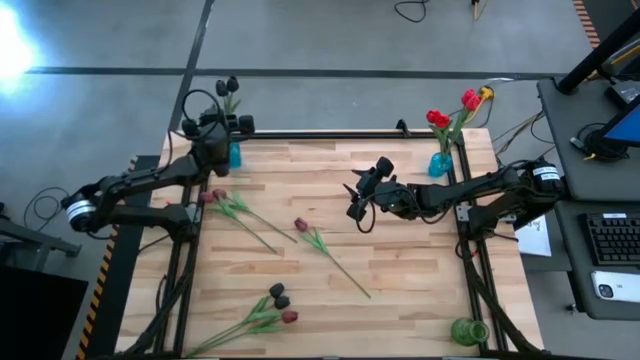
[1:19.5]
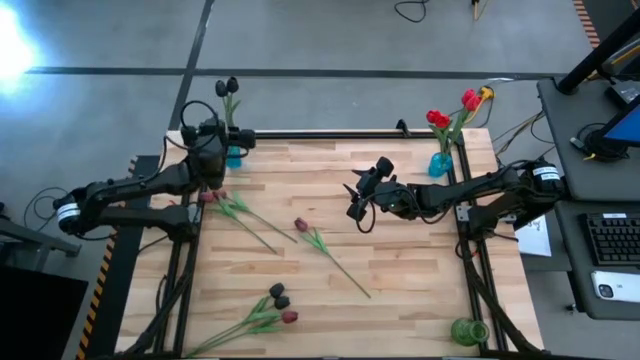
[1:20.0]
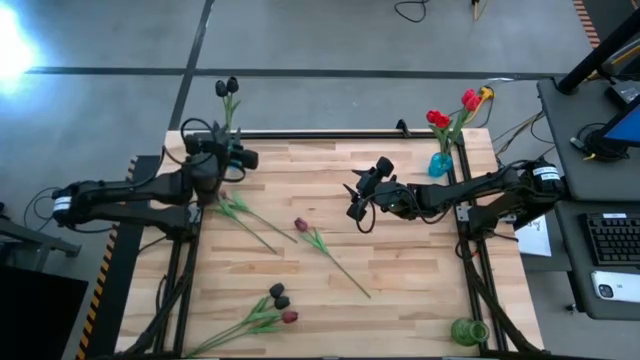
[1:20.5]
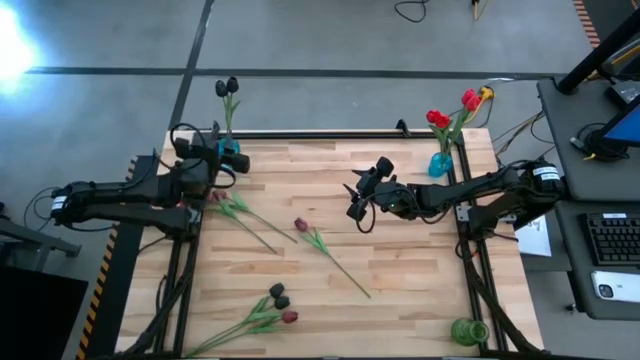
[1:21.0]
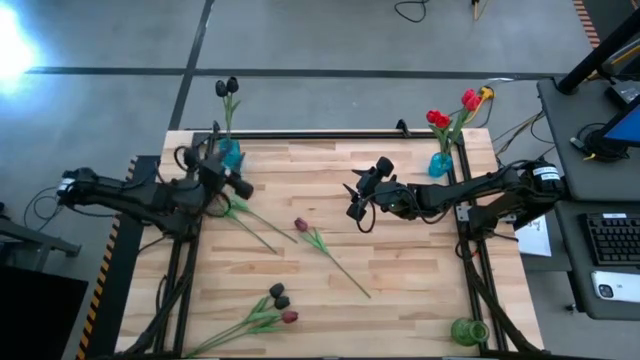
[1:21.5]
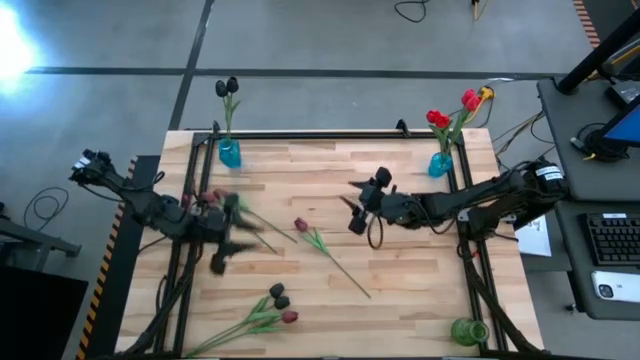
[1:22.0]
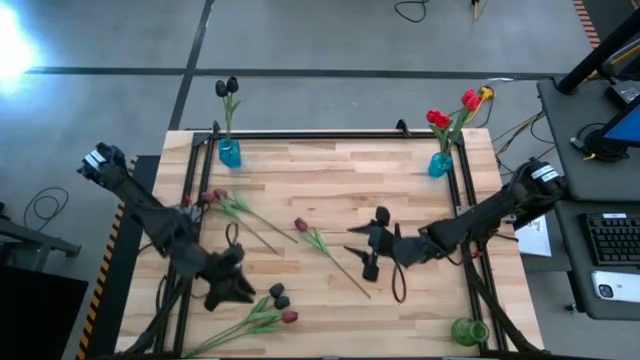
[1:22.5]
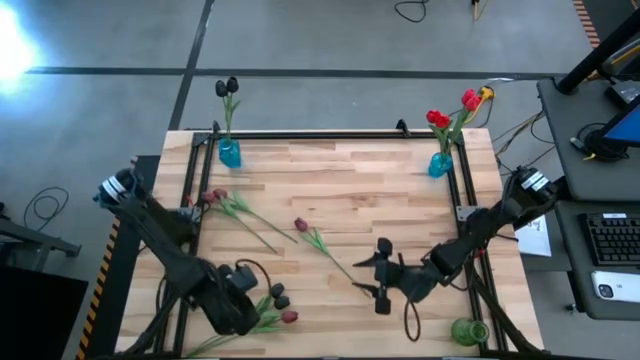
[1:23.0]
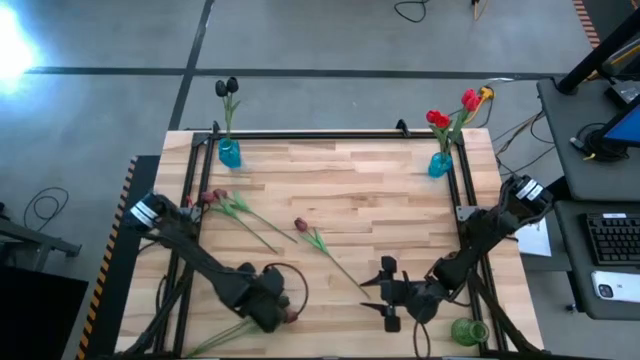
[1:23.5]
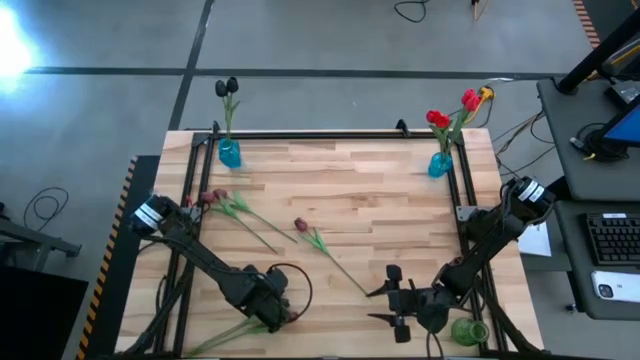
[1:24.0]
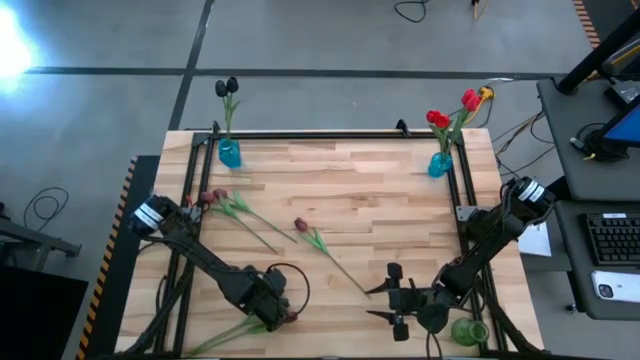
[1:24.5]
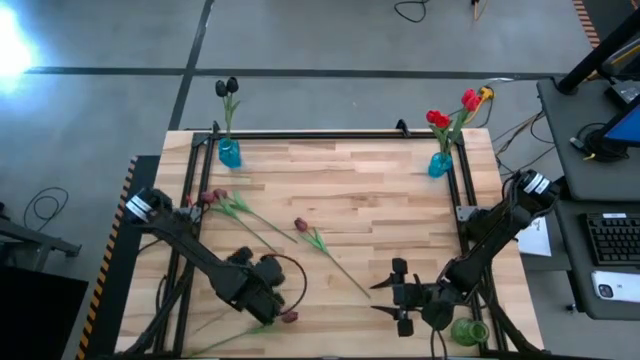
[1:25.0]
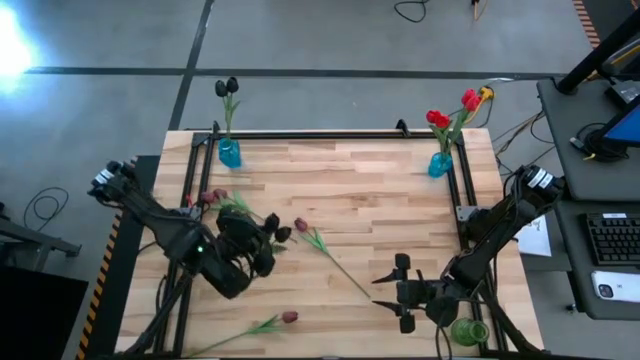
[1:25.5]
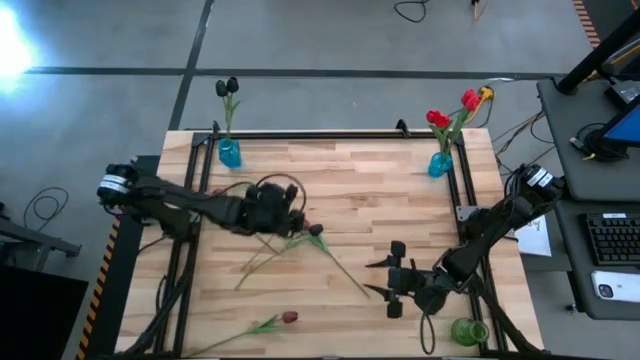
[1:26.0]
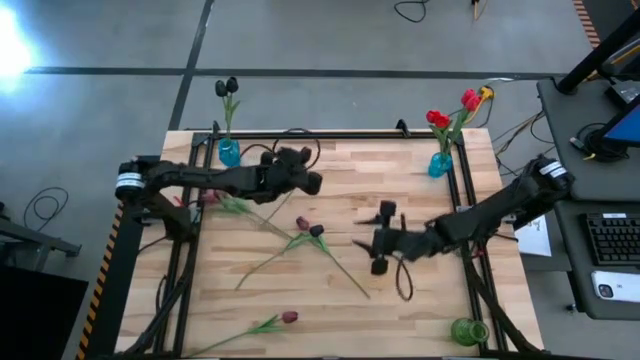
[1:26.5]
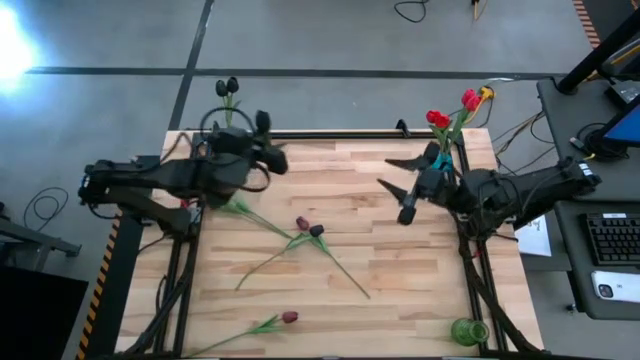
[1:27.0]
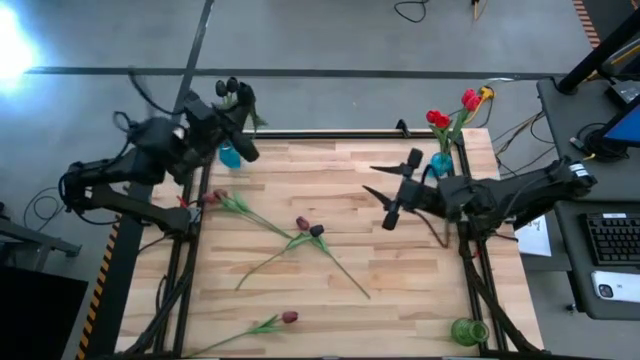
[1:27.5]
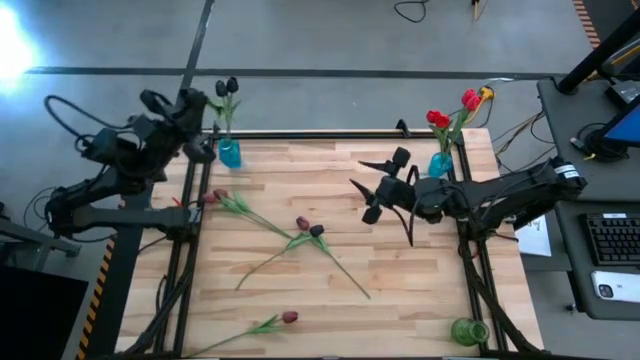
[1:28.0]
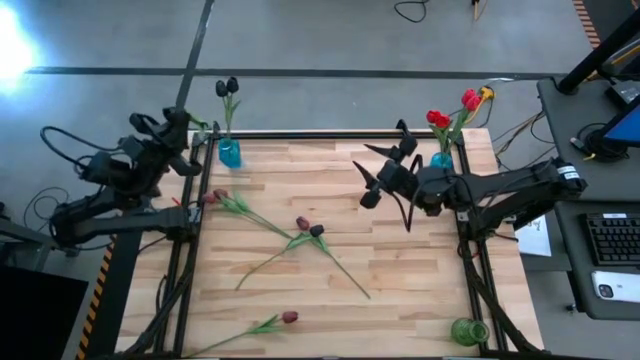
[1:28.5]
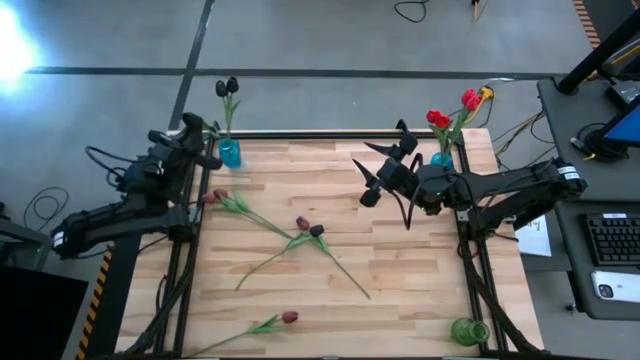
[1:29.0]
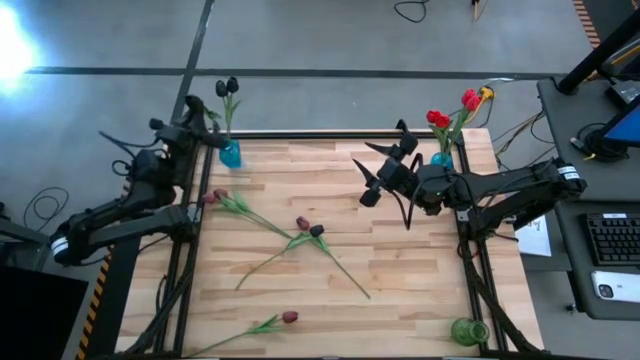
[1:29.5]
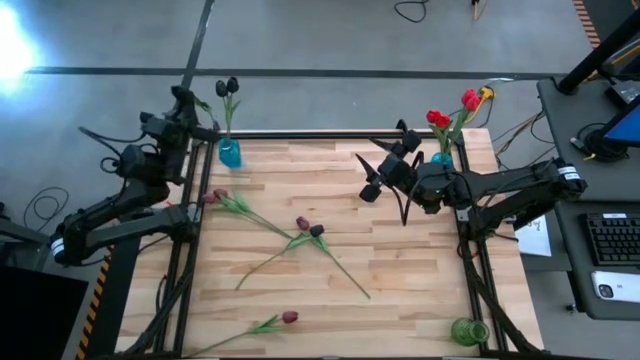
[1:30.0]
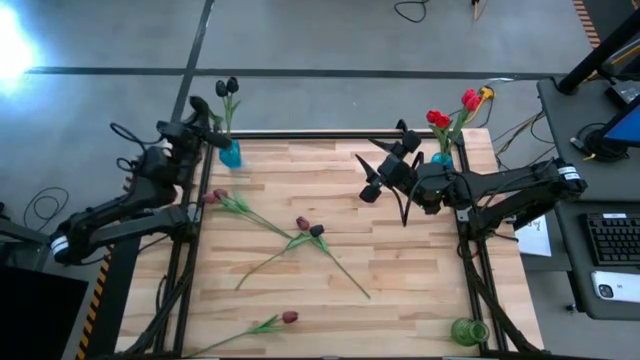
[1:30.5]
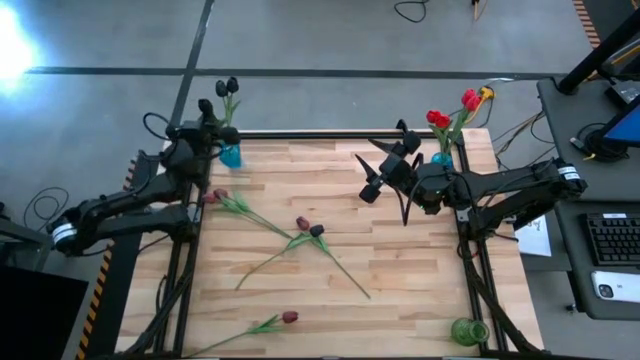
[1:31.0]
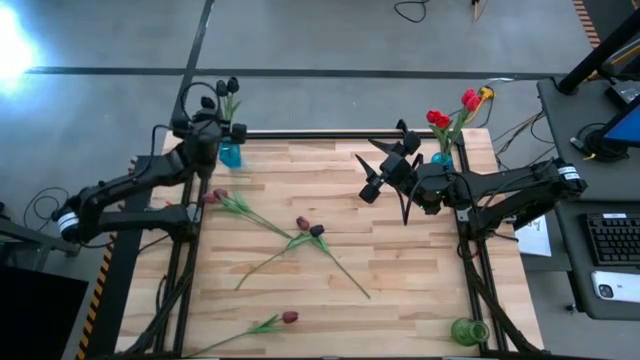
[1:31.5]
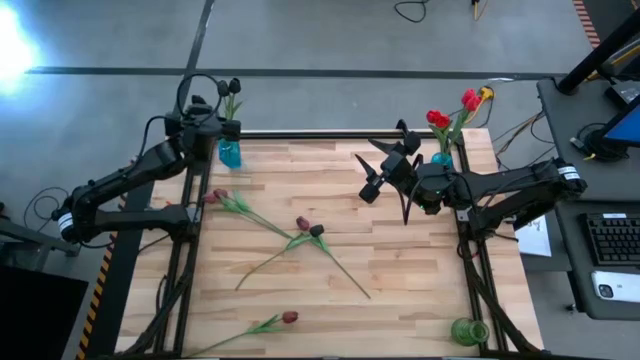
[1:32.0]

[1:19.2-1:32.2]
Task: Sort flowers into vase by color
Put the black tulip into the left blue vase

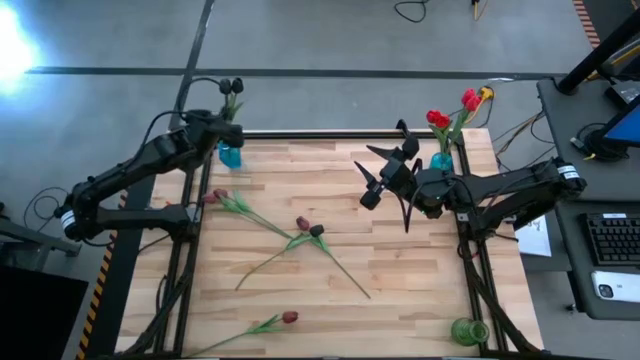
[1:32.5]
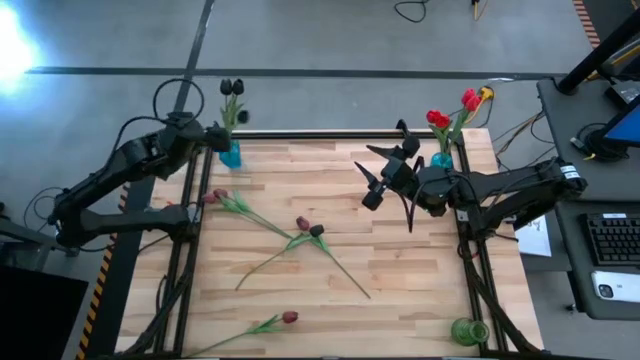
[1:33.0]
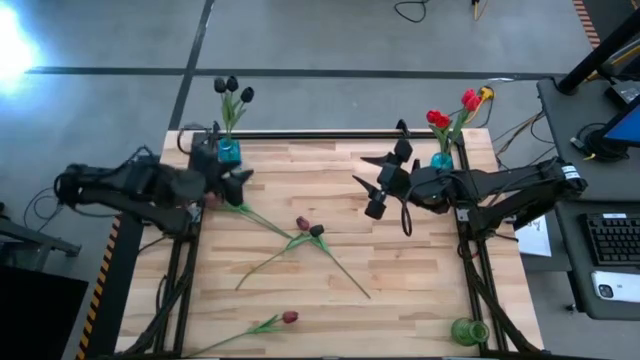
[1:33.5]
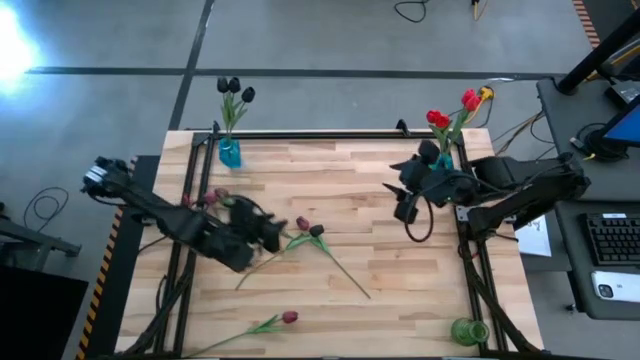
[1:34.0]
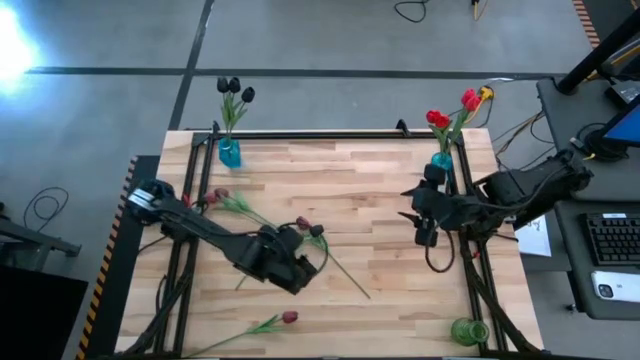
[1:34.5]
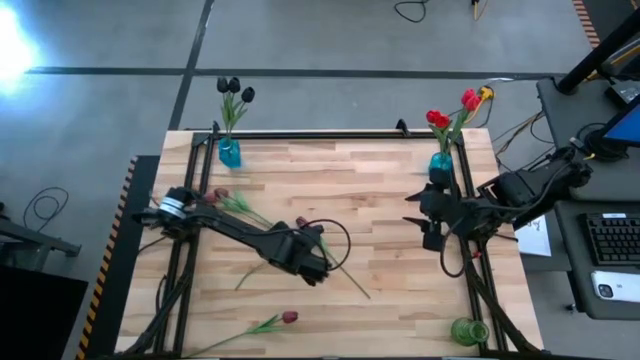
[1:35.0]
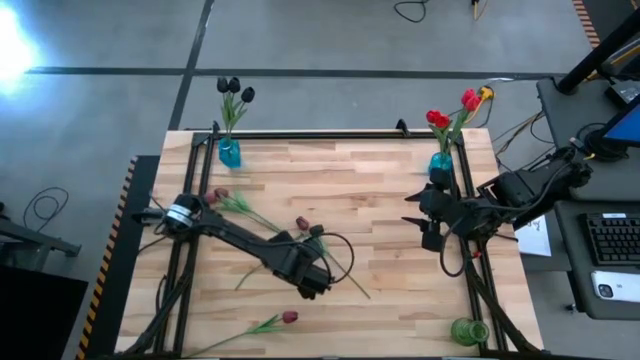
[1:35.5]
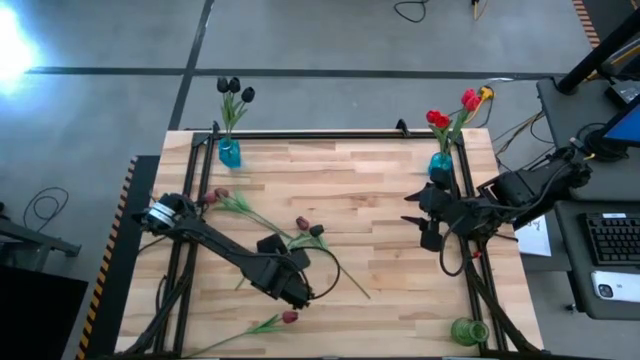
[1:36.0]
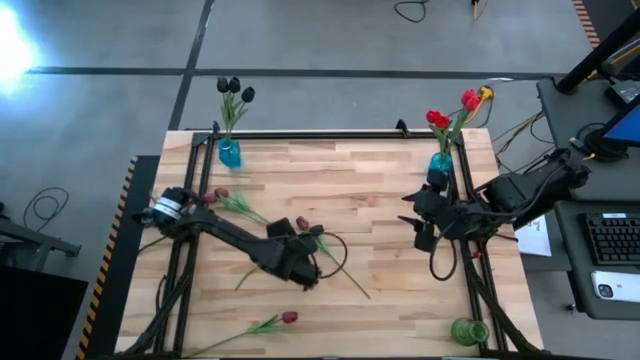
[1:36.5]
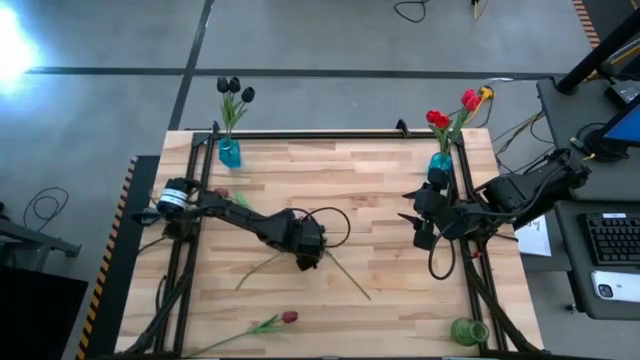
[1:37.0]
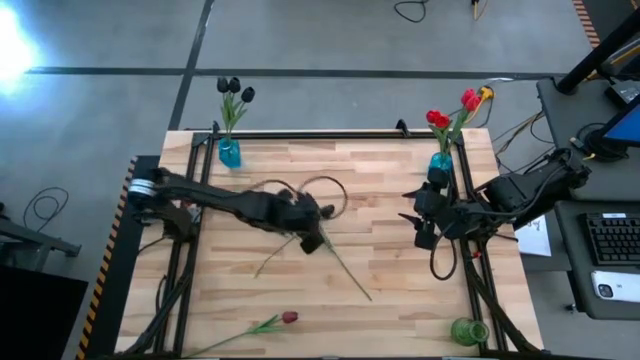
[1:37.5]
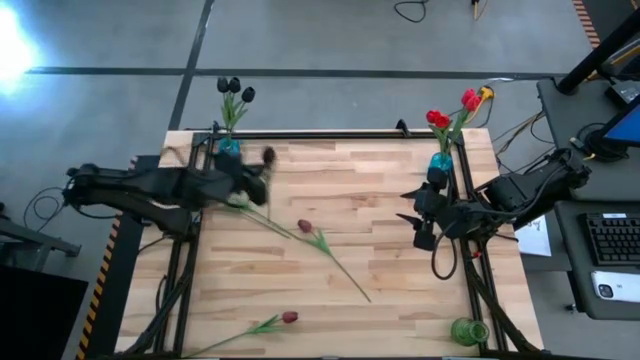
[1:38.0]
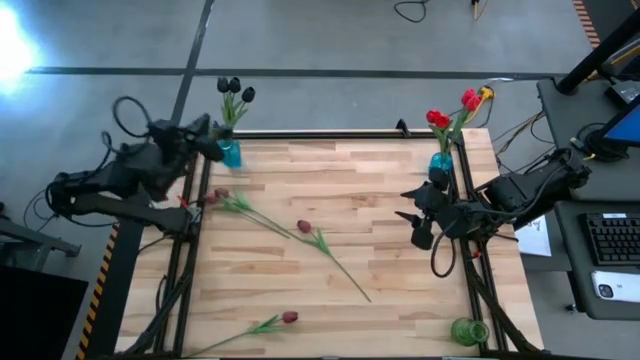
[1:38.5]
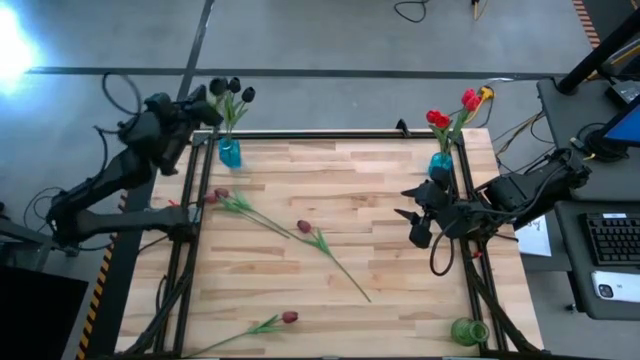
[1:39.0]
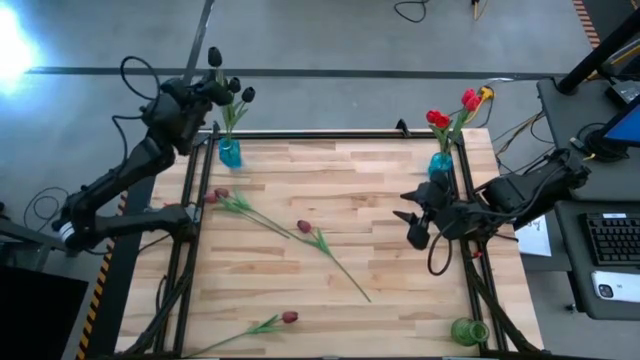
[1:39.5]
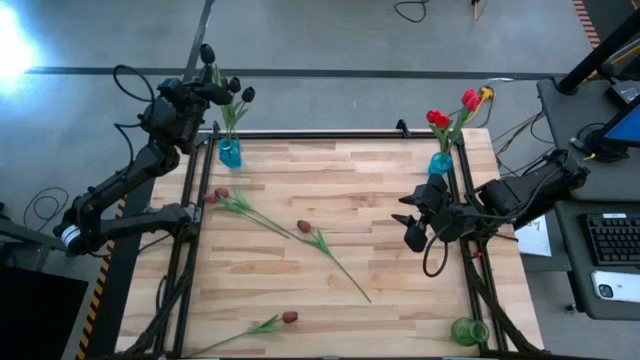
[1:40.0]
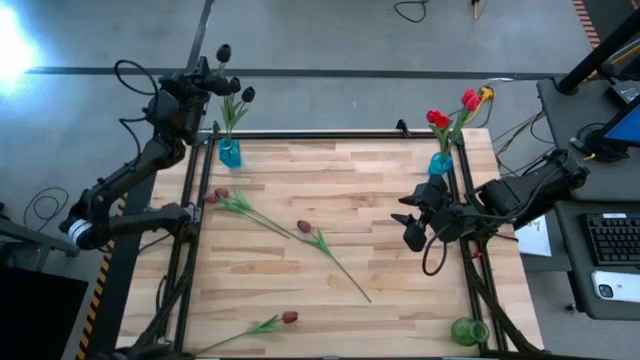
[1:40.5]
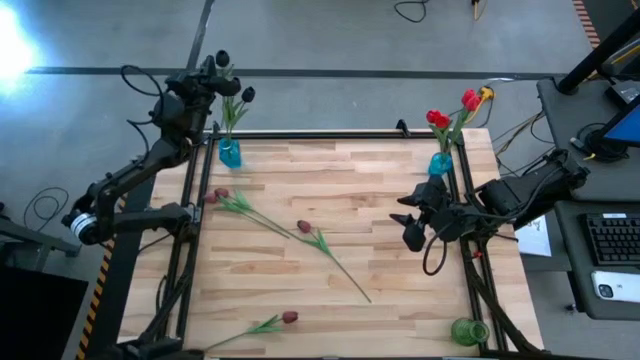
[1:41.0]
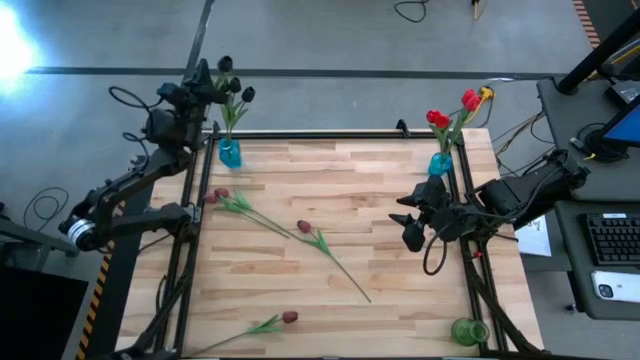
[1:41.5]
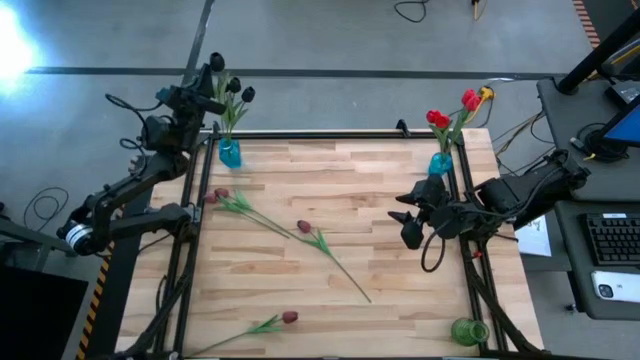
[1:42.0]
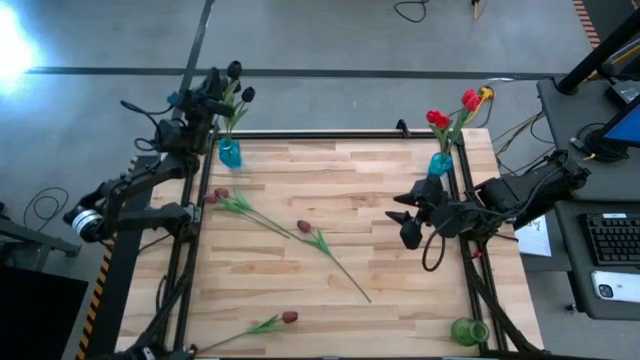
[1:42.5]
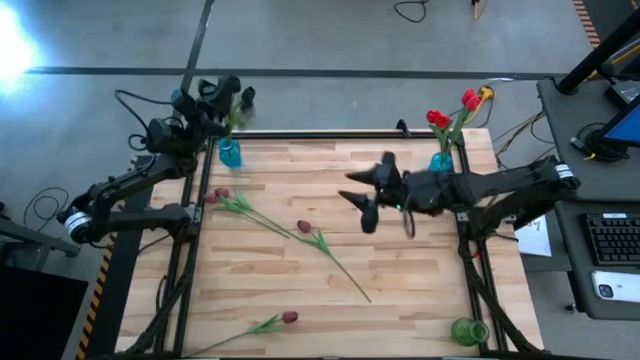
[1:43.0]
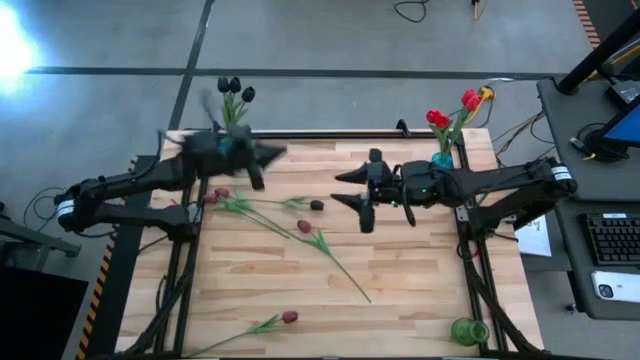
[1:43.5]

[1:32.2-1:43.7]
Put the black tulip into the left blue vase
